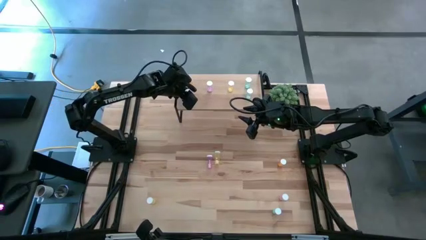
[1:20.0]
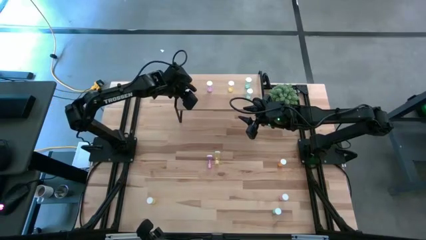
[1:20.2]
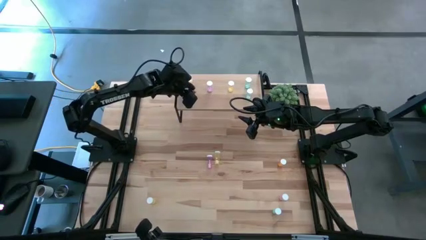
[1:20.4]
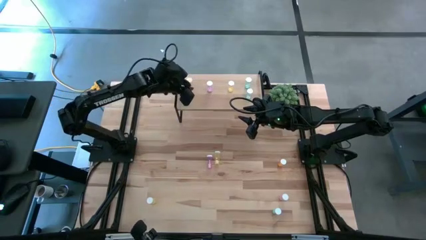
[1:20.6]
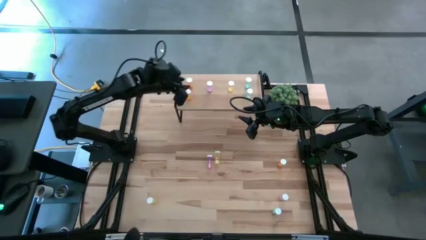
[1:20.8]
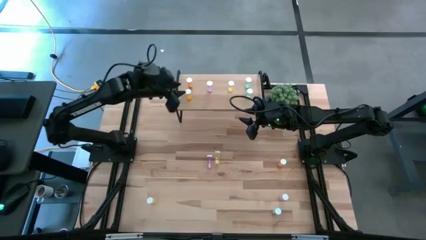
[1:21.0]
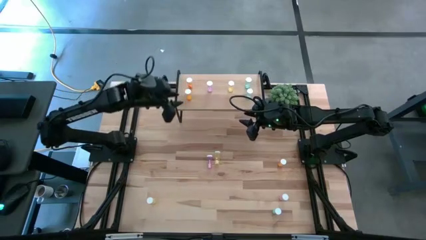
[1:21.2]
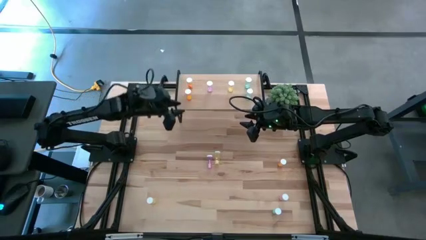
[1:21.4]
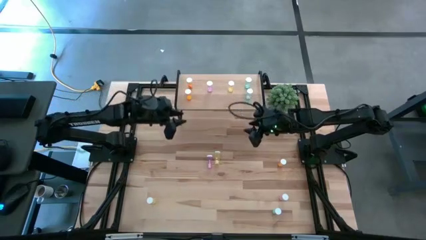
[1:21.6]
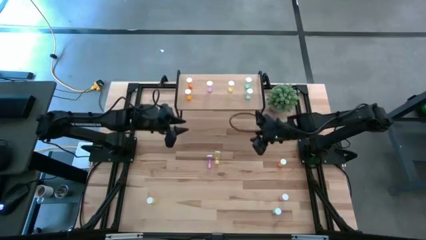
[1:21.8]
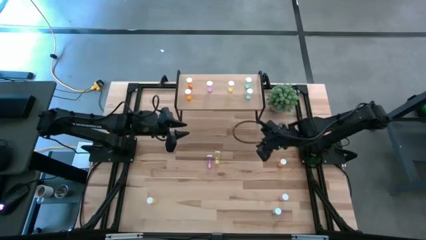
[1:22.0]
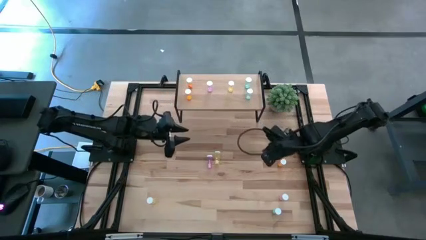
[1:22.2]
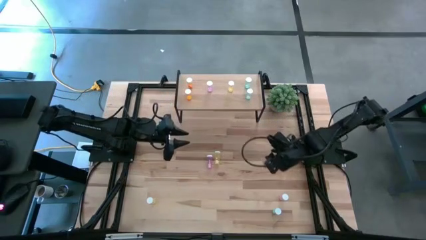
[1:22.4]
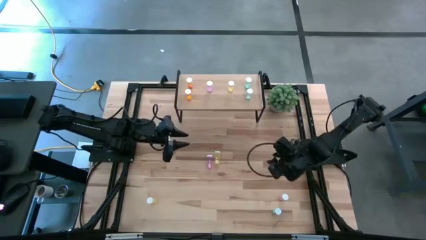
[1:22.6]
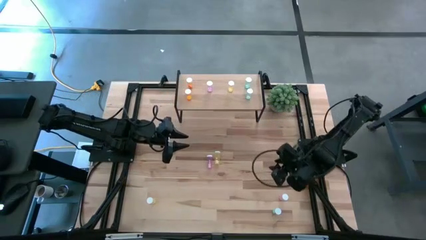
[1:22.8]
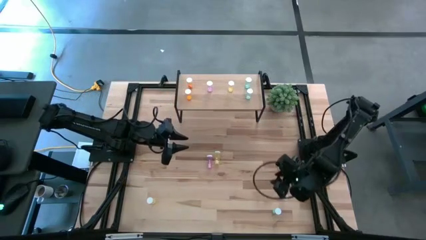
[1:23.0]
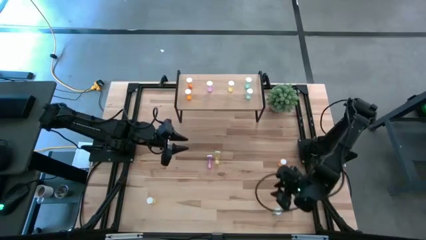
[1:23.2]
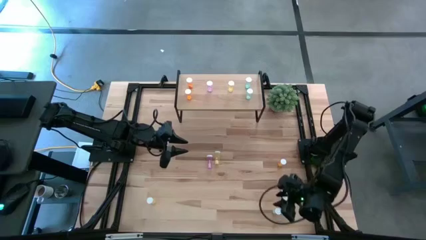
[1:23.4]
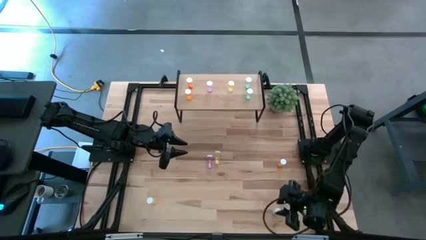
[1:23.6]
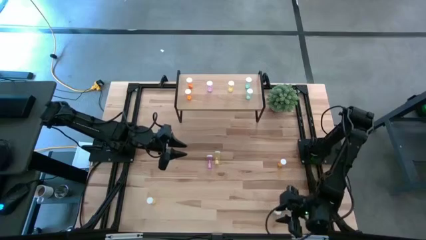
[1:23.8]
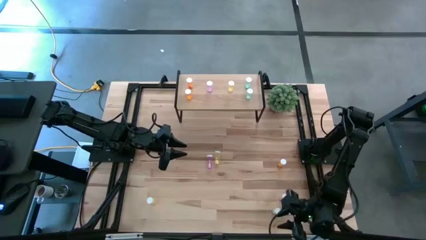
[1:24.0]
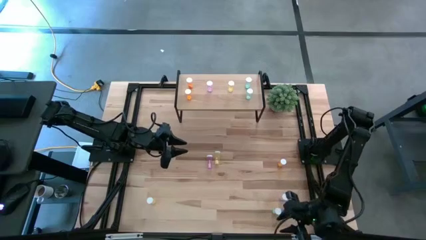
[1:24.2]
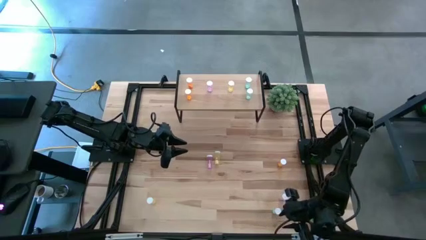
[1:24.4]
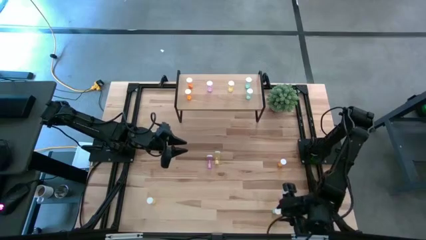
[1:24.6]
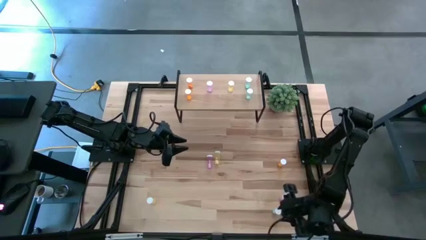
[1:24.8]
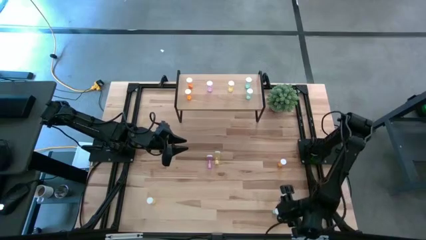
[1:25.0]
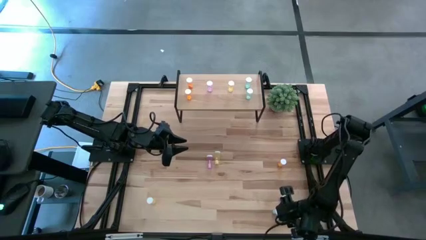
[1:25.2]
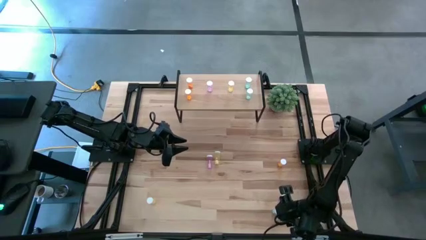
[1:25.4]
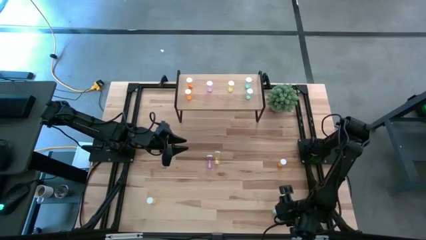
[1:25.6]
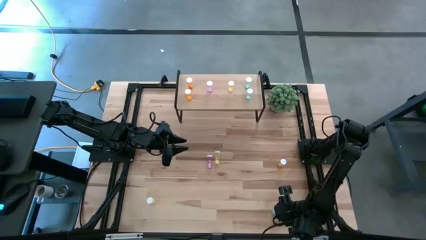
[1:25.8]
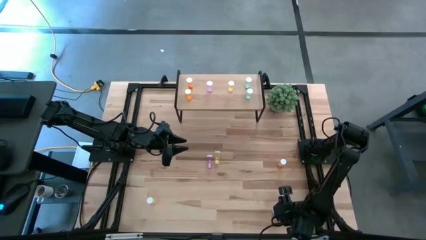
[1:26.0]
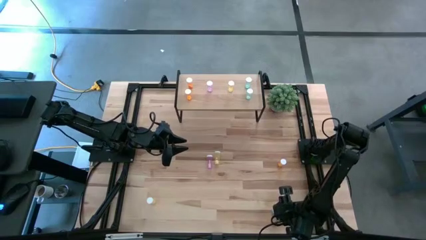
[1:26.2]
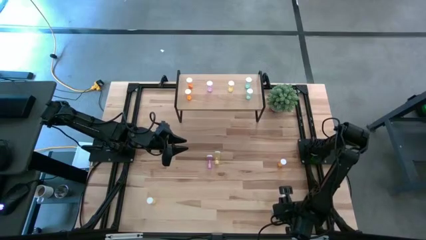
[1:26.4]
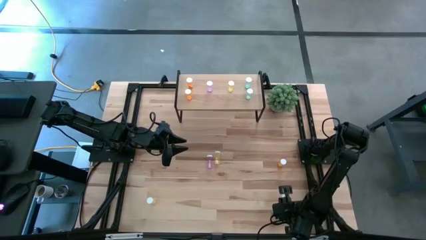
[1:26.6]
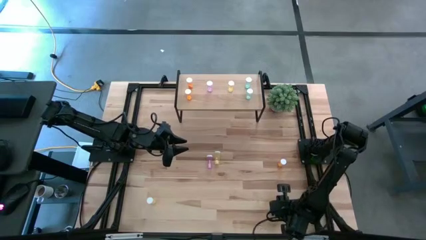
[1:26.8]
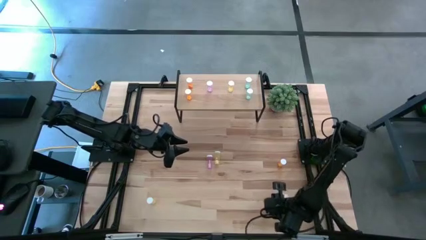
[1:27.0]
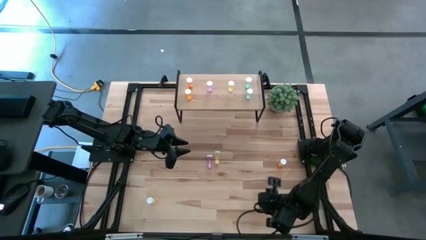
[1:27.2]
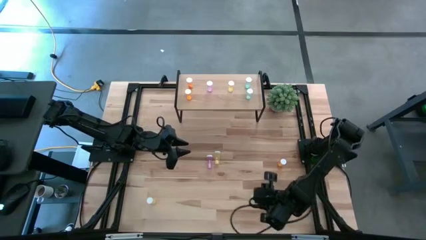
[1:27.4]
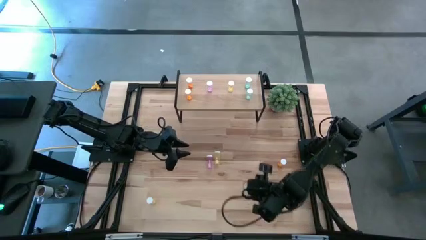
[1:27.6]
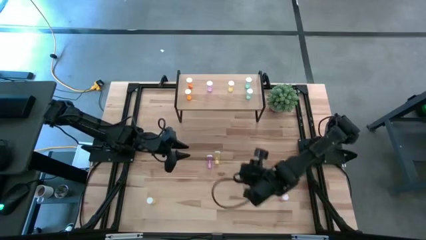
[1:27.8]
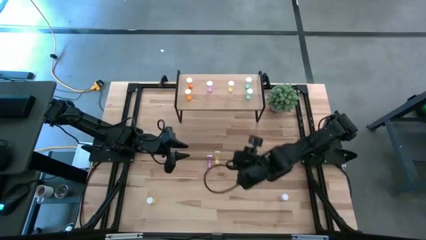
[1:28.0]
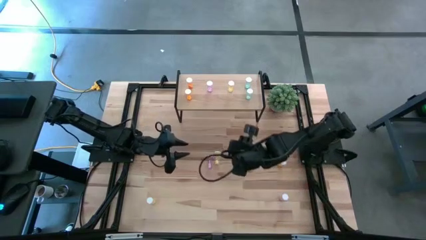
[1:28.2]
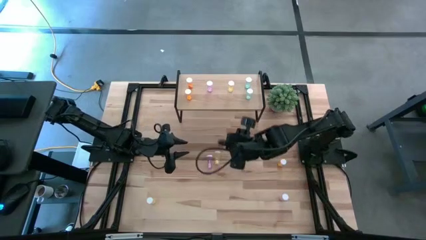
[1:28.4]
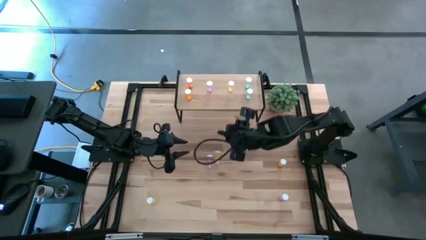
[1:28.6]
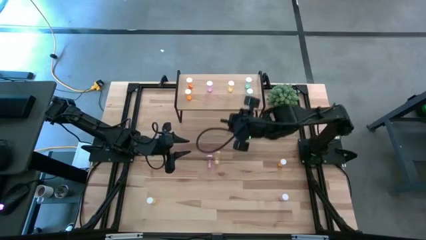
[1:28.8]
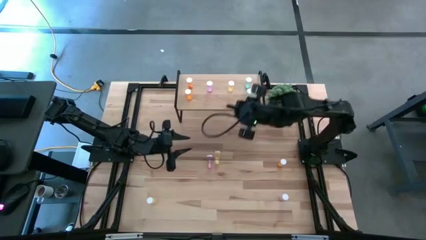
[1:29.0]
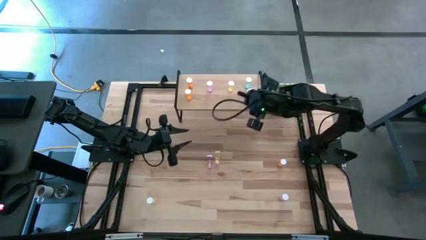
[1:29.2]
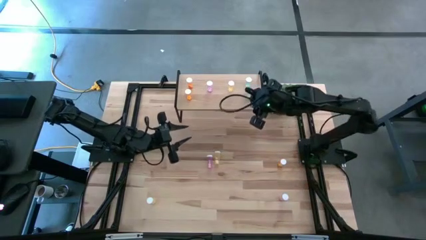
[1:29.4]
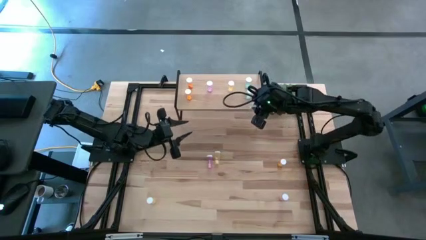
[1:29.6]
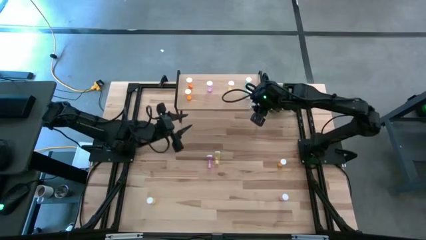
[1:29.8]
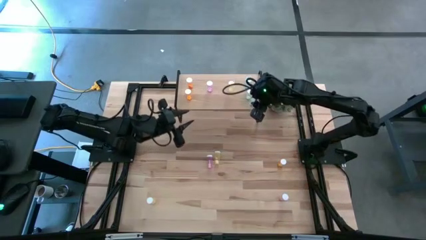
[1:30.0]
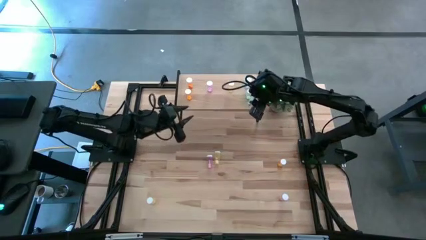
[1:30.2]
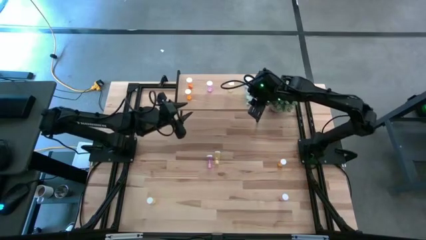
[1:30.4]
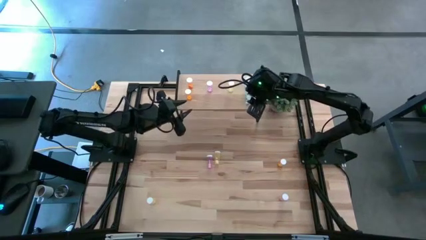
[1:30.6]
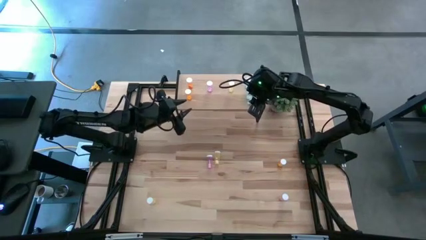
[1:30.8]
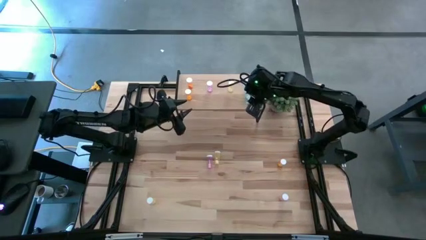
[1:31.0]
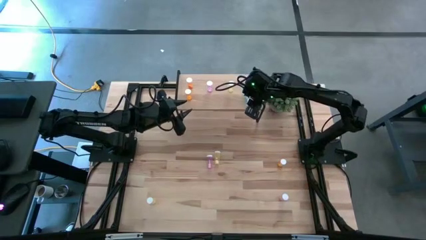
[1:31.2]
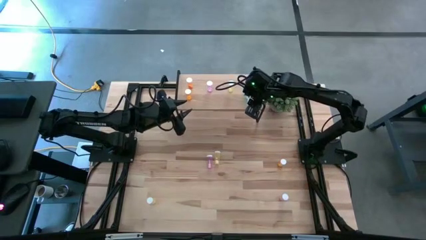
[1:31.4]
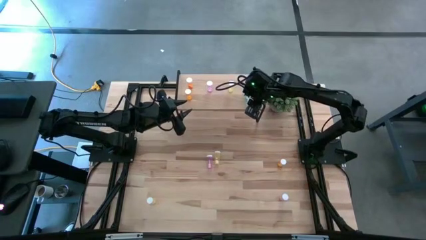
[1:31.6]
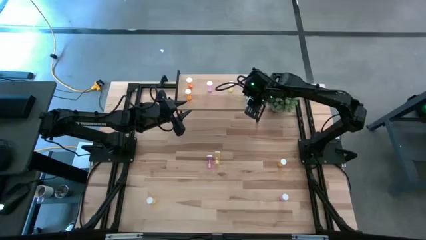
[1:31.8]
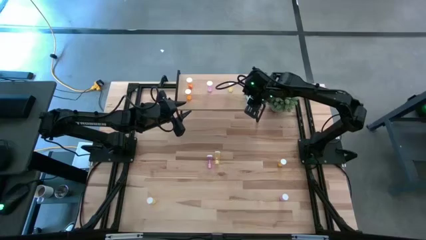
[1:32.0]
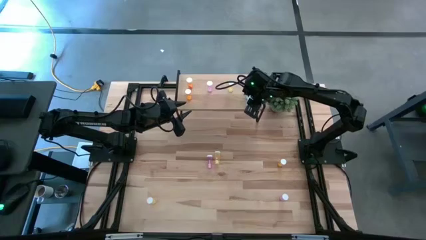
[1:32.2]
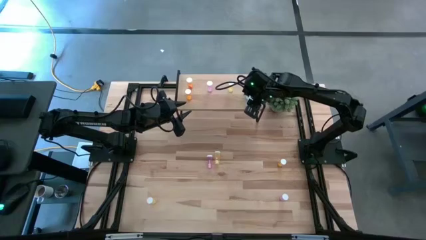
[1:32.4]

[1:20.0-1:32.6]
Task: Pick and place medicine bottles onto shelf by color
Put the green pill bottle on the shelf aligned with the other green pill bottles

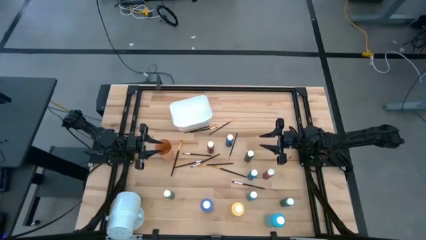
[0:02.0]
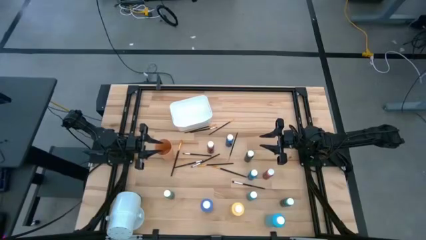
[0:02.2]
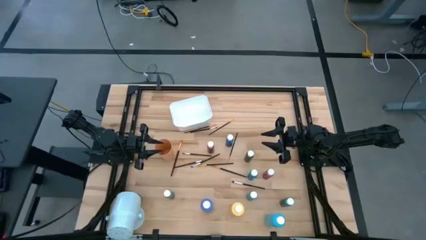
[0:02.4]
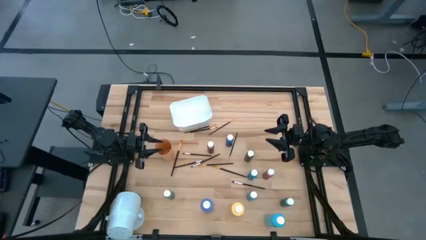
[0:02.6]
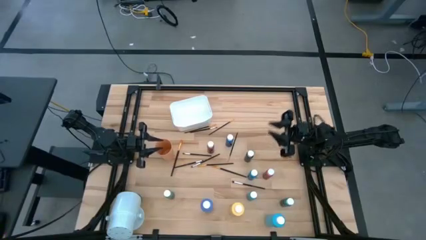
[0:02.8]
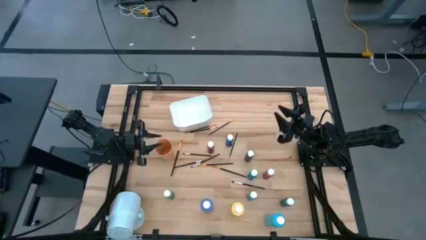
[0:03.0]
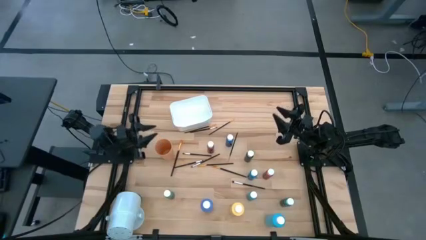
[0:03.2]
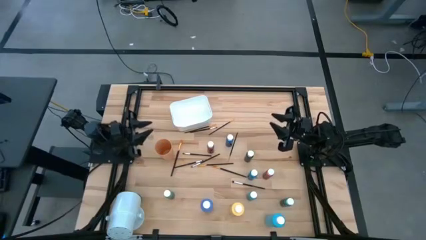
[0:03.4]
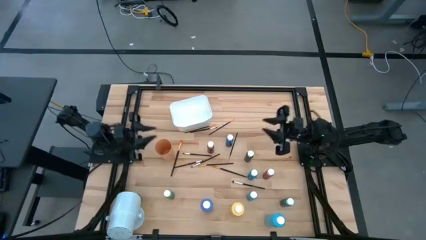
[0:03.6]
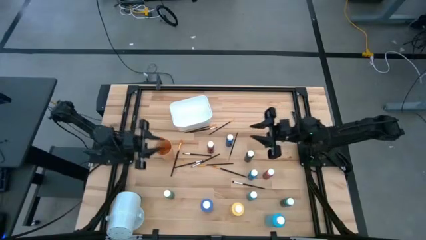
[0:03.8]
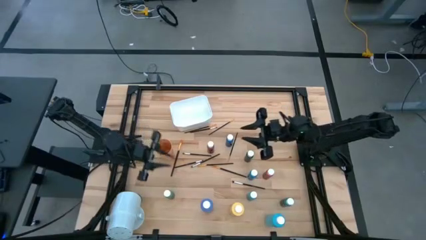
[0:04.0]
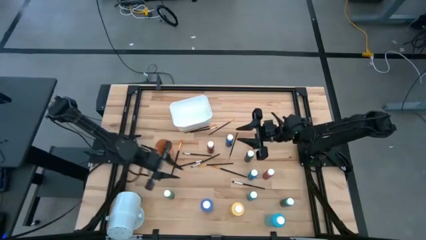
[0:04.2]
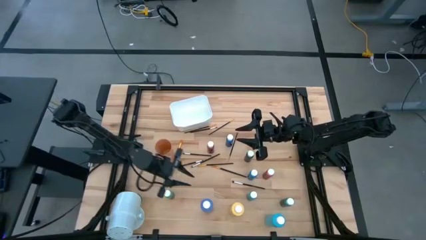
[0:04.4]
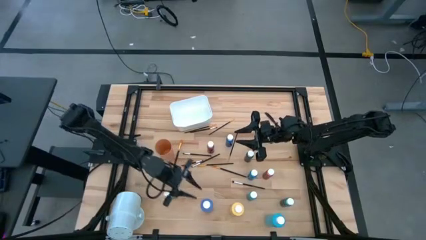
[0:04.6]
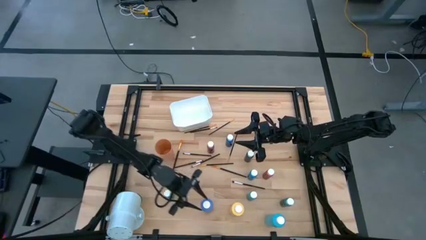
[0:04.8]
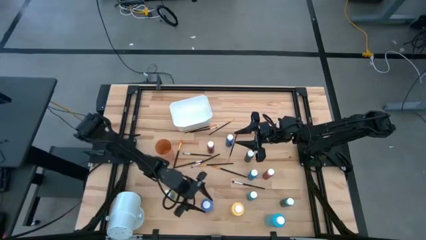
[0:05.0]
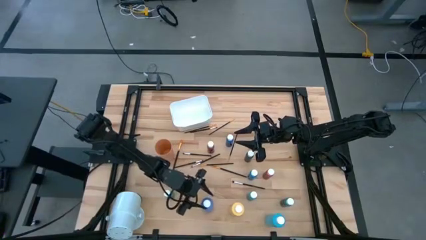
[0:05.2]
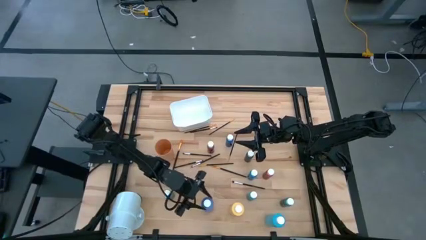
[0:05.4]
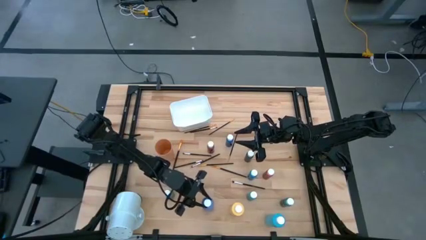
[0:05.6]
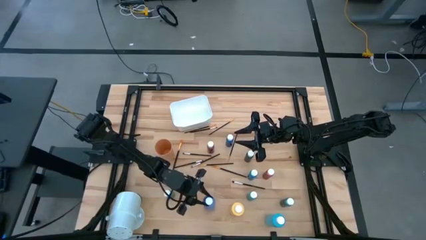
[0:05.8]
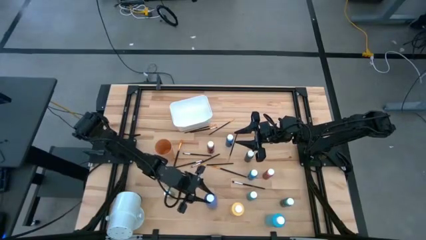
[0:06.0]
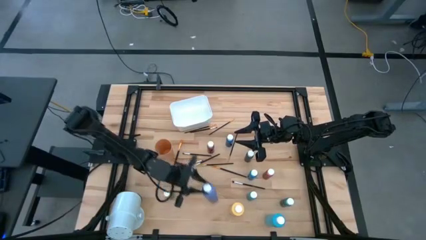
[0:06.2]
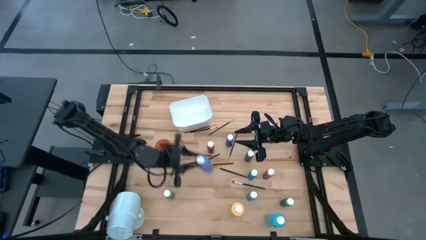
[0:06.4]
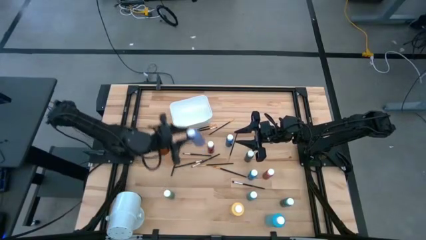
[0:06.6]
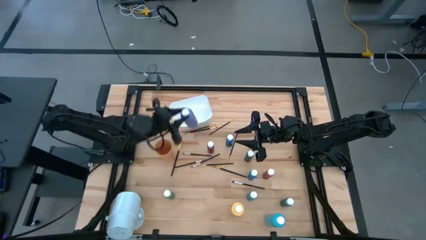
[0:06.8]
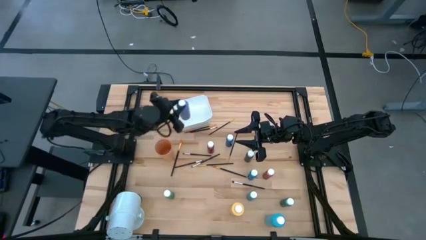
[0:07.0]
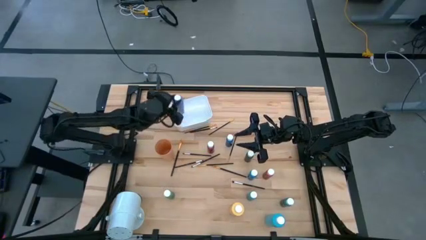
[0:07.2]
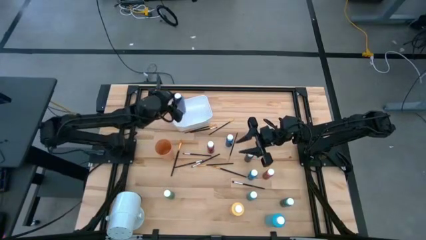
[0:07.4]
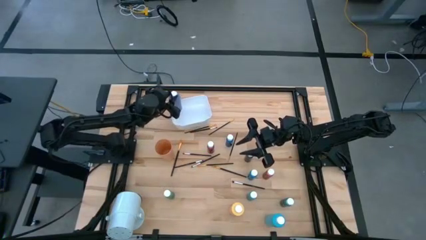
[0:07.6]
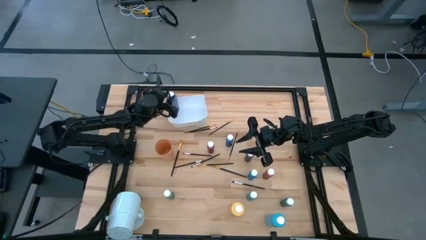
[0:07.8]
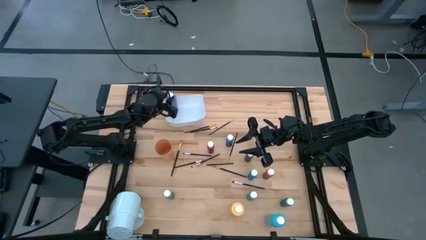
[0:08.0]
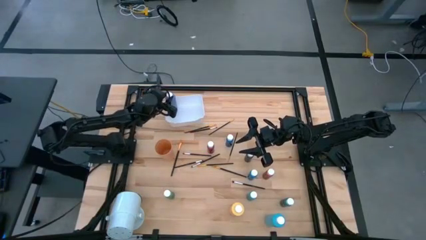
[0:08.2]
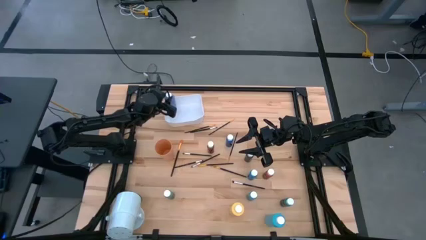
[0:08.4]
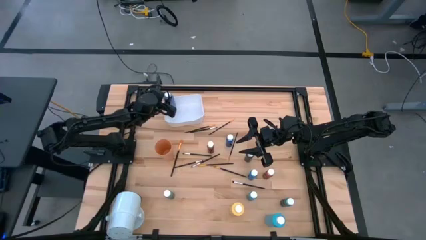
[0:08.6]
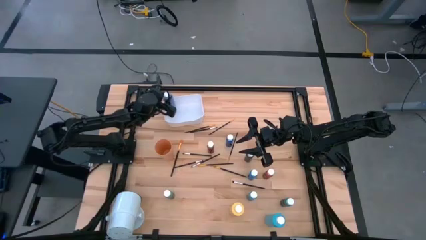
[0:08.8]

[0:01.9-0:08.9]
Task: Pick & Place Paint Supplies
Put the large blue paint bottle into the white bin
